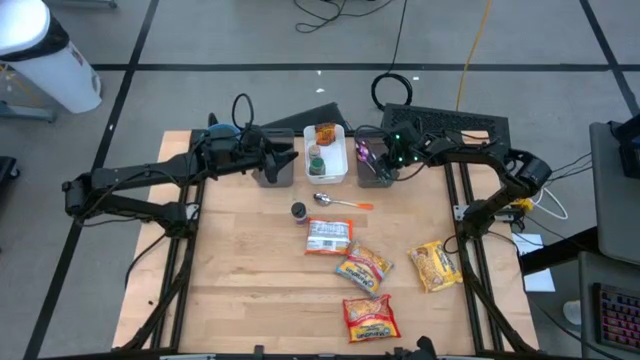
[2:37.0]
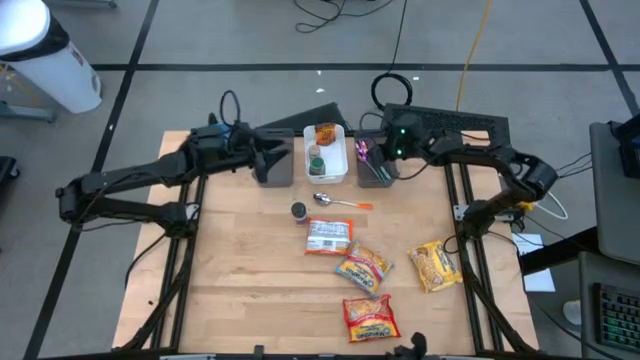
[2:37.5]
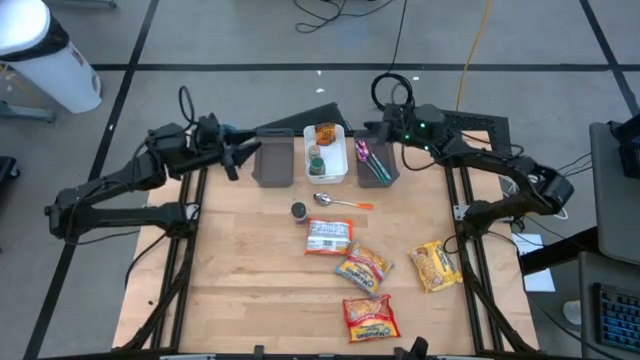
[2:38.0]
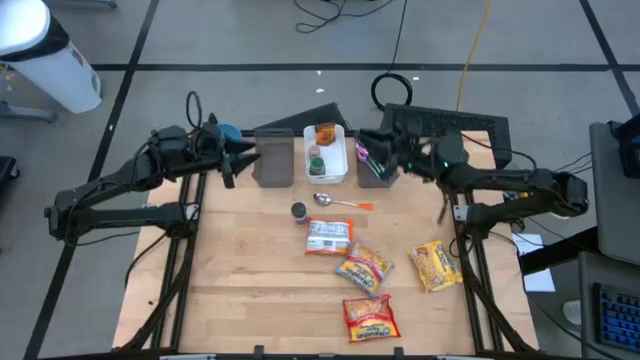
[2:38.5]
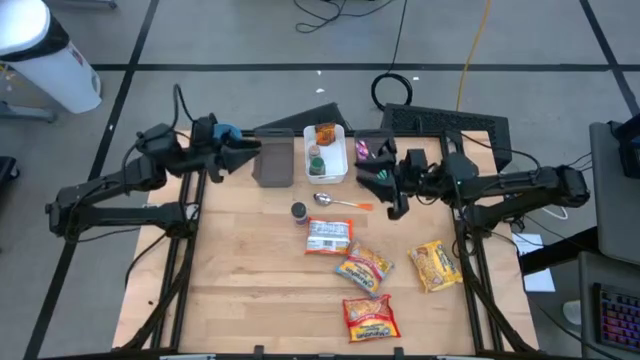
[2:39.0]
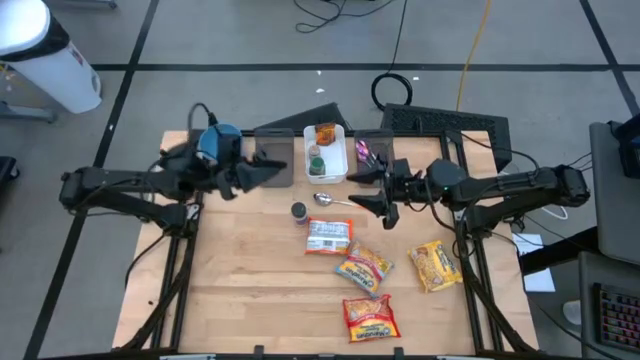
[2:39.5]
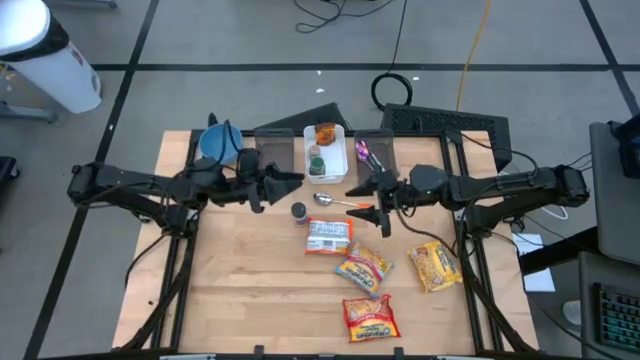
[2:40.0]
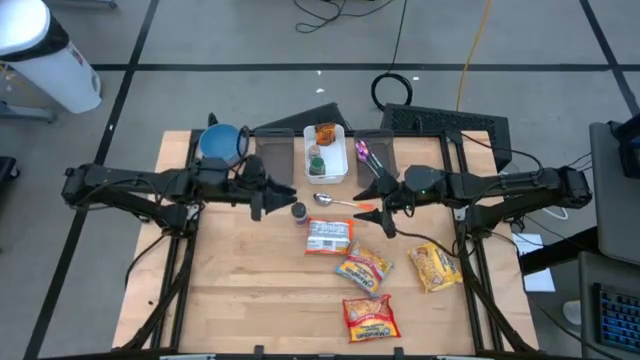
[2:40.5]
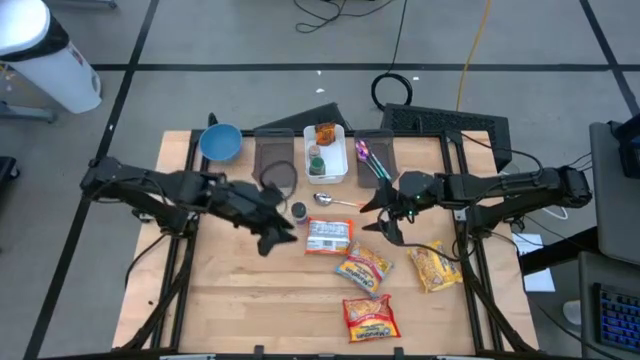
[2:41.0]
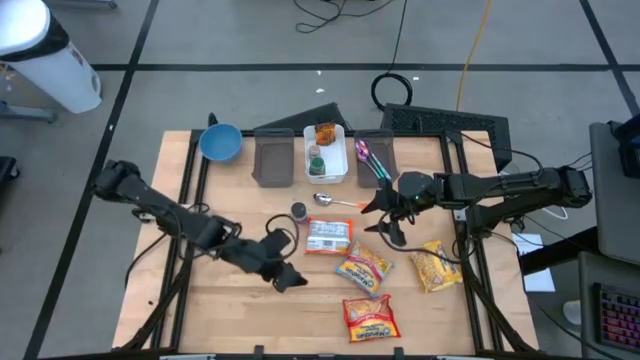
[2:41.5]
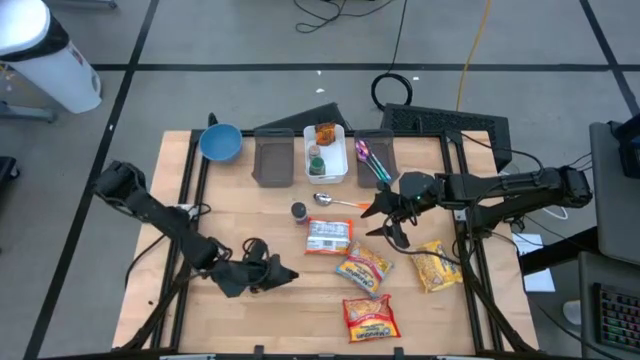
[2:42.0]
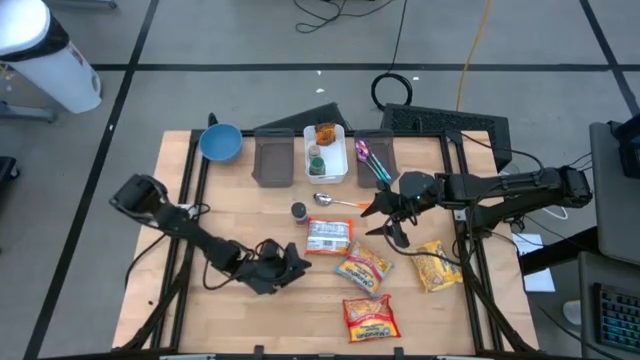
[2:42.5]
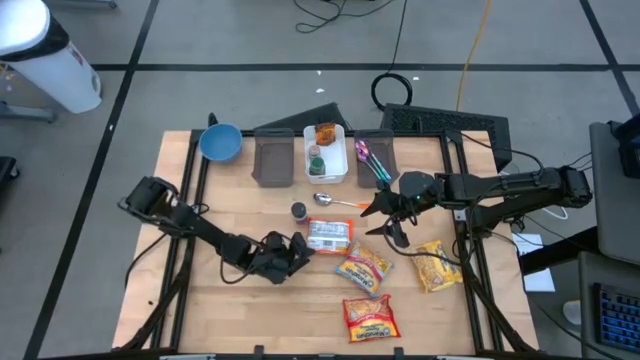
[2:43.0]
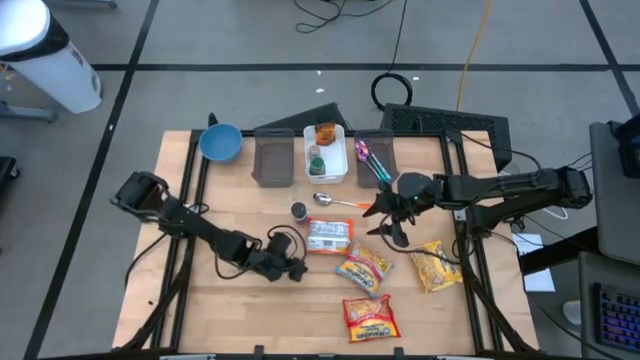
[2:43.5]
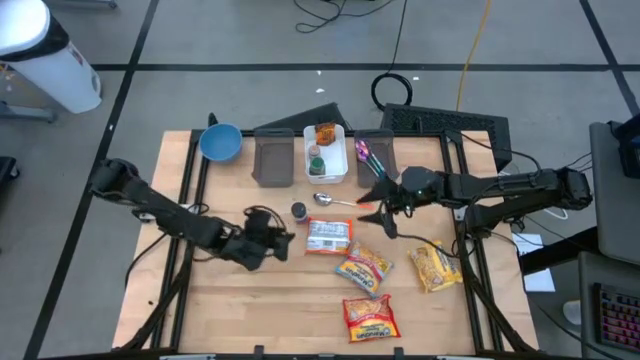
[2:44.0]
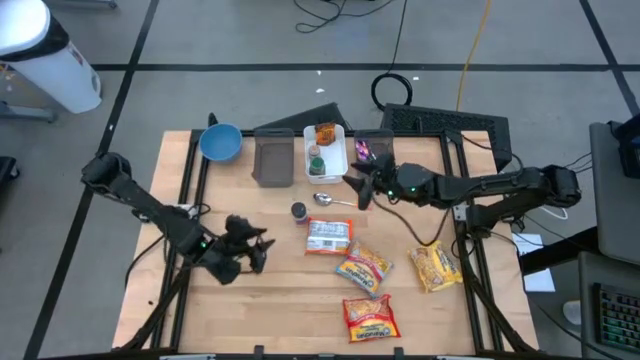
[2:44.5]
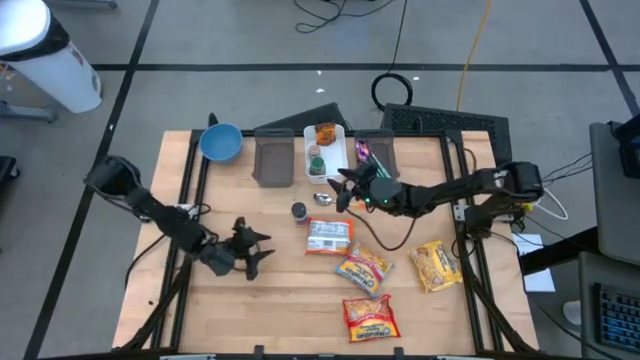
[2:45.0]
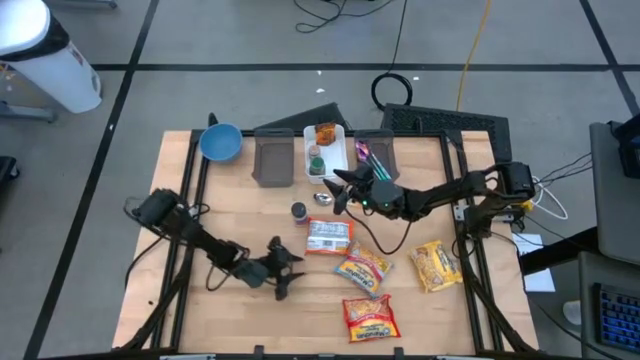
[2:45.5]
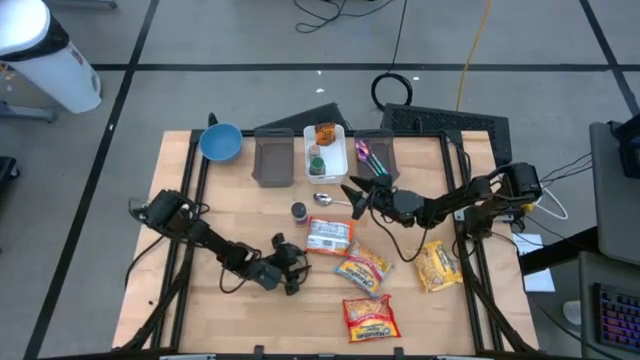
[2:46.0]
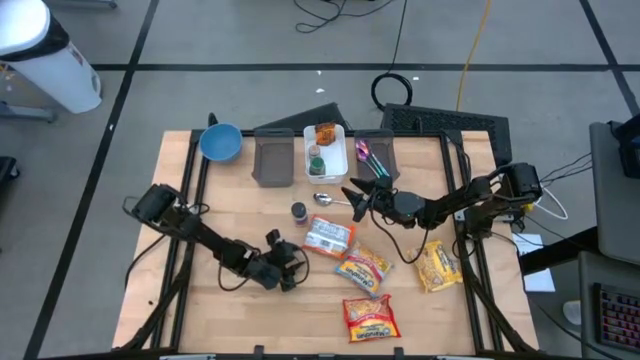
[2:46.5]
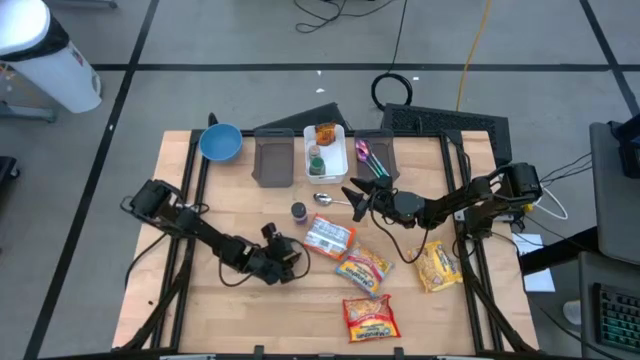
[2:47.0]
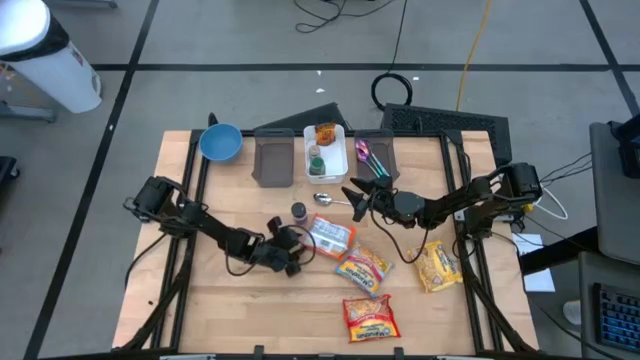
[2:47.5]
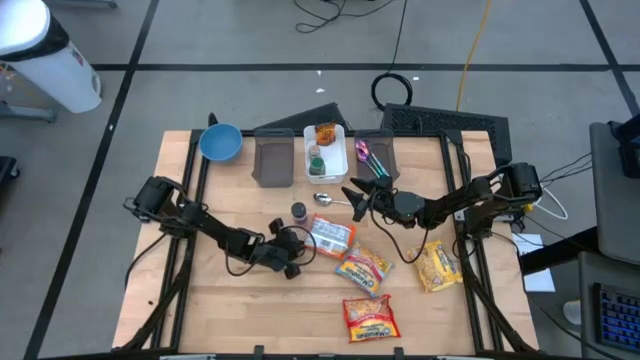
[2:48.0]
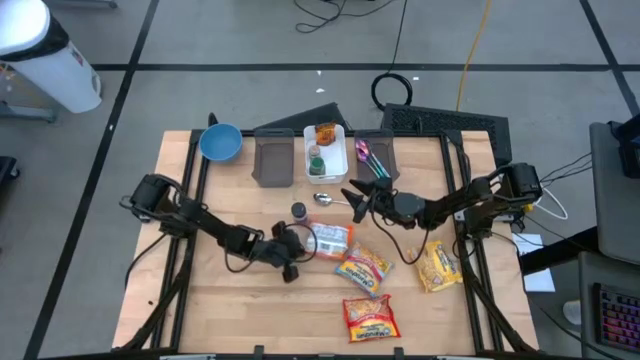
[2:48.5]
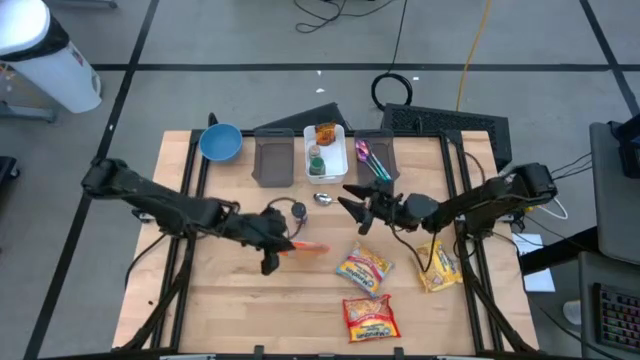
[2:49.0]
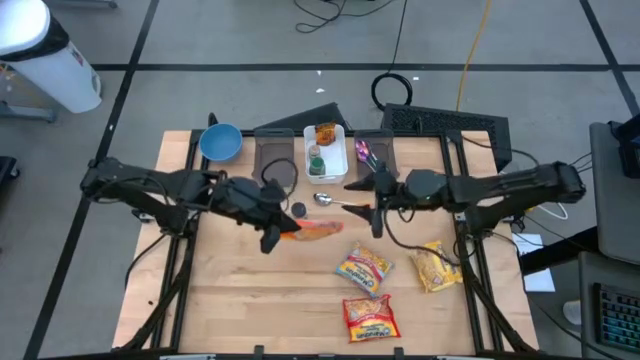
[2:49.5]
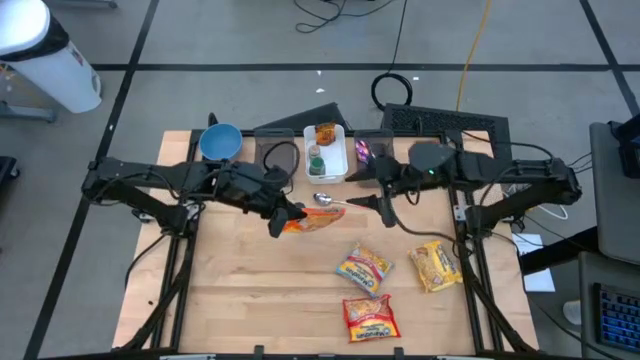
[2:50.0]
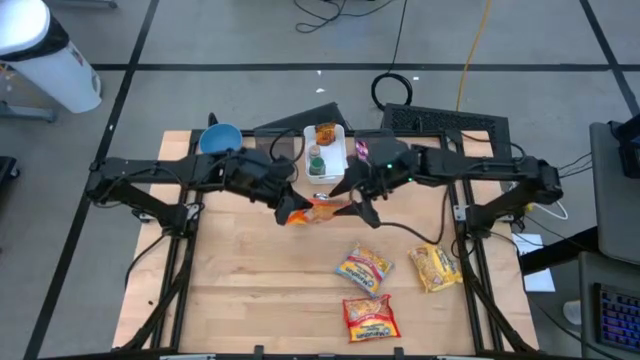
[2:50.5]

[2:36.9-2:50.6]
Task: Pick & Place Food Item
Put the orange noodle pack into the left black bin

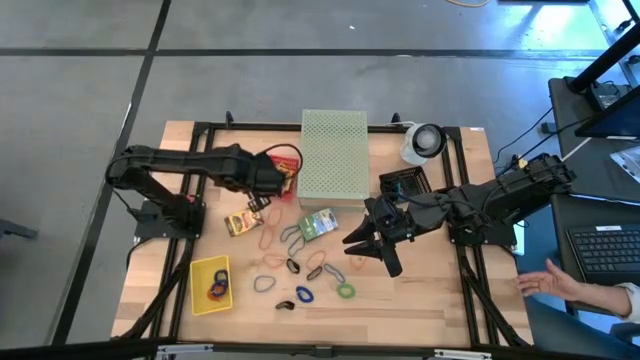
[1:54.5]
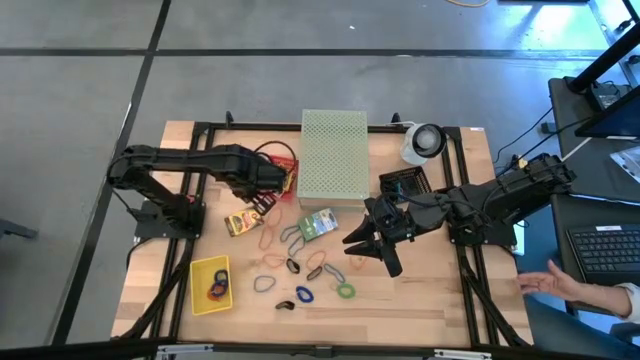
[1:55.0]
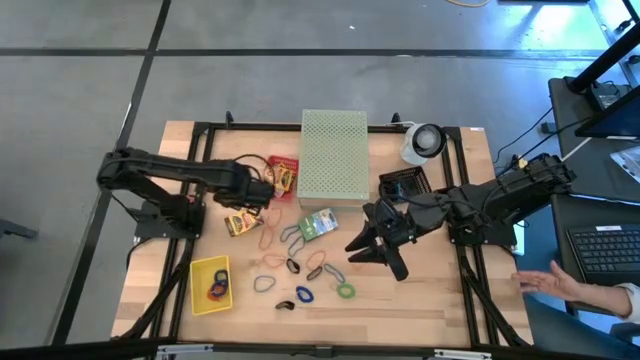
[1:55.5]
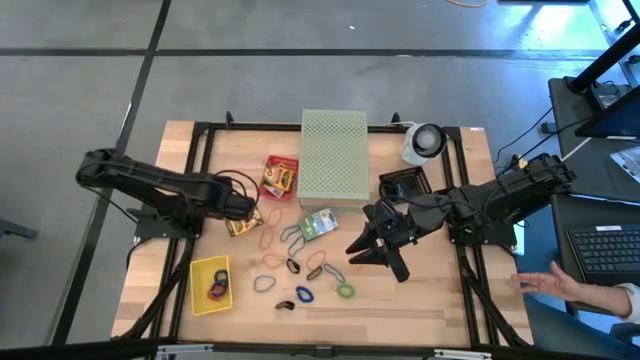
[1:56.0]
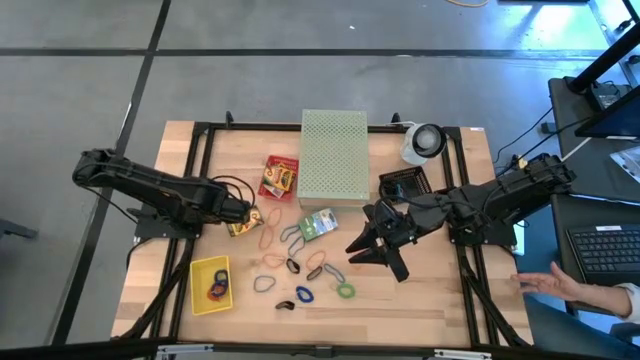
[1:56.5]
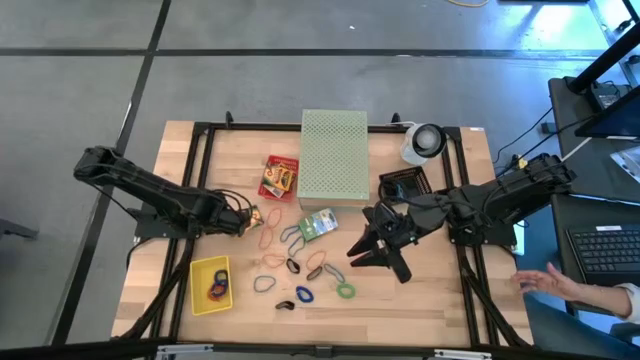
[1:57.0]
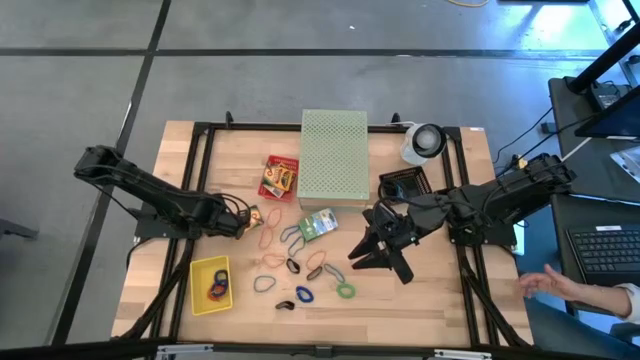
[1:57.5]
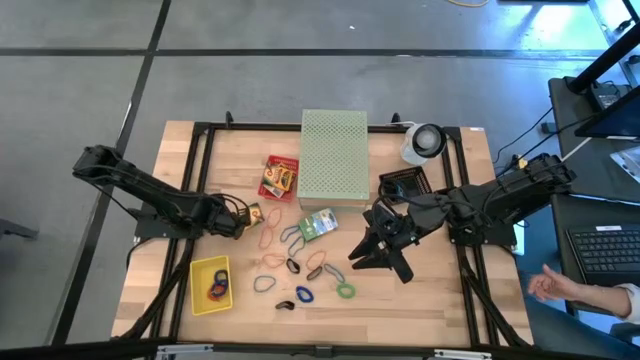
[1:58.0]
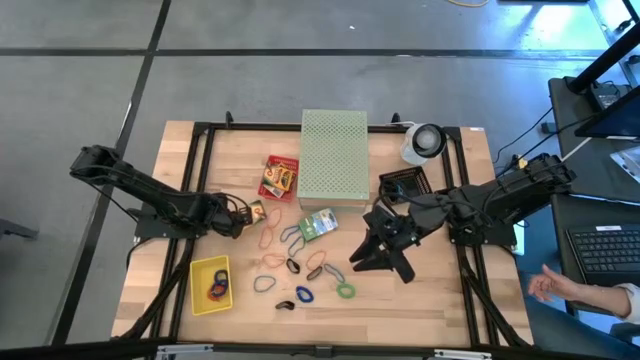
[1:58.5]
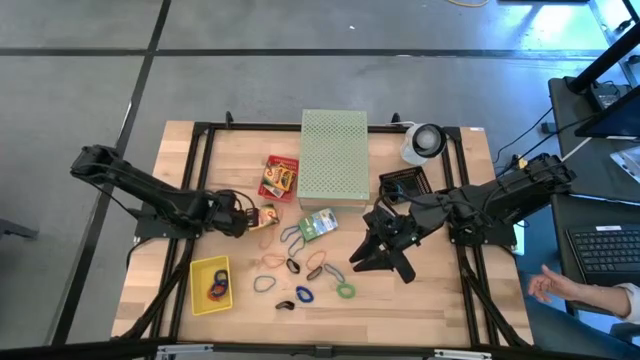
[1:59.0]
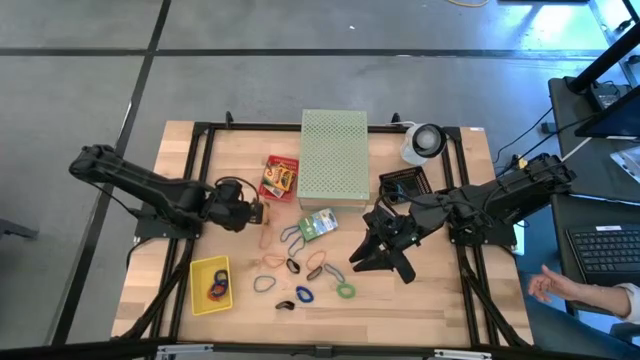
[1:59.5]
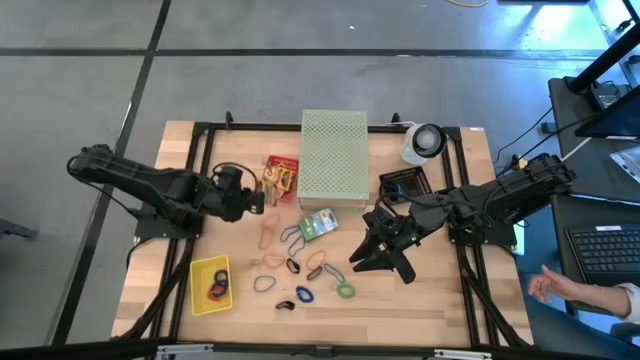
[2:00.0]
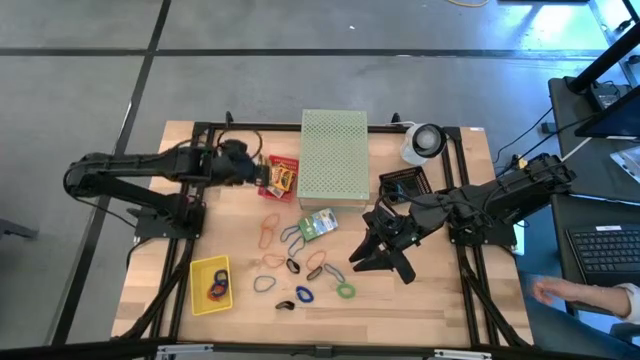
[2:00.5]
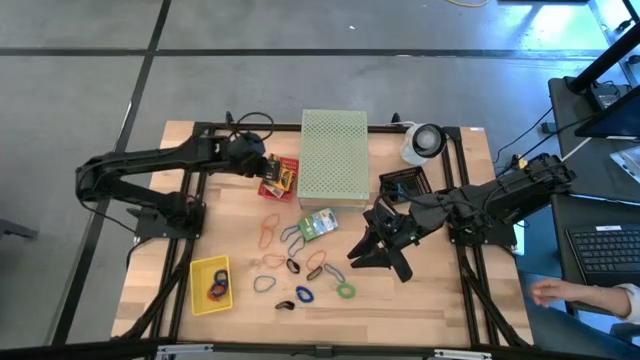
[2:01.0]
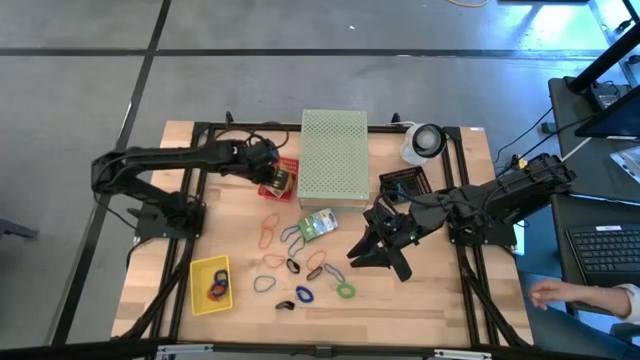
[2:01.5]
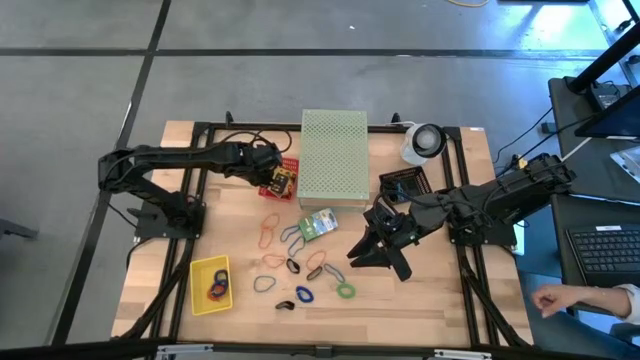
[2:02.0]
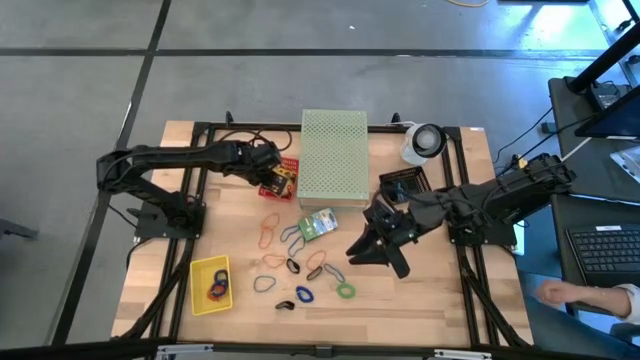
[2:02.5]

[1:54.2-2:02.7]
Task: Pick & Place Office Desk Supplies
Put the crayola box into the orange bin
